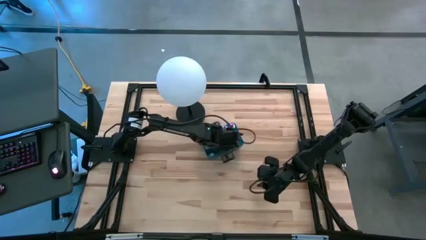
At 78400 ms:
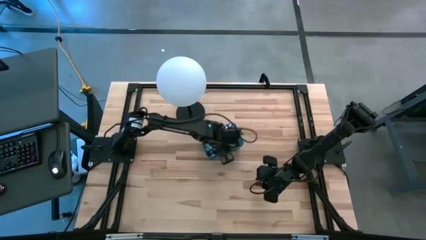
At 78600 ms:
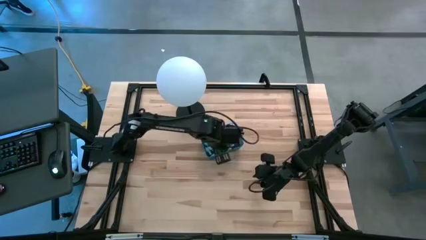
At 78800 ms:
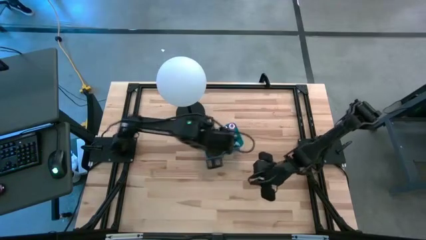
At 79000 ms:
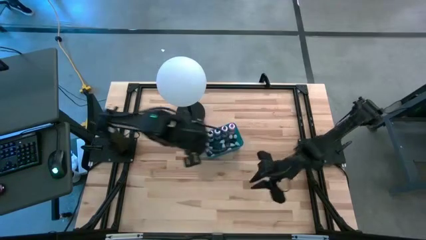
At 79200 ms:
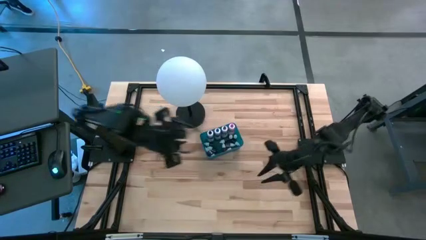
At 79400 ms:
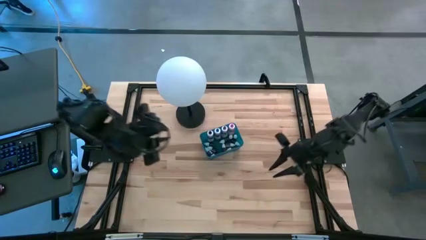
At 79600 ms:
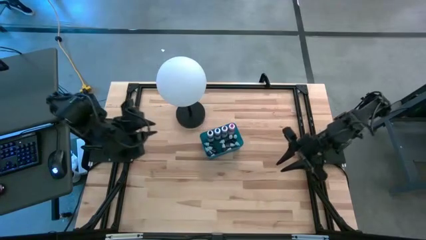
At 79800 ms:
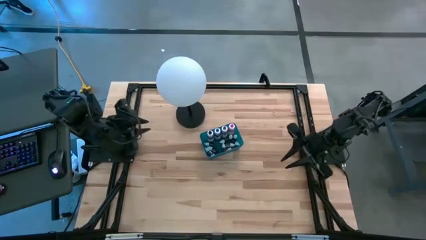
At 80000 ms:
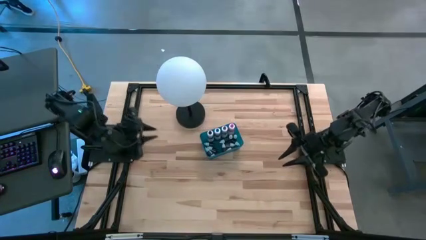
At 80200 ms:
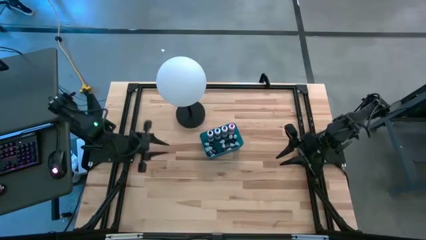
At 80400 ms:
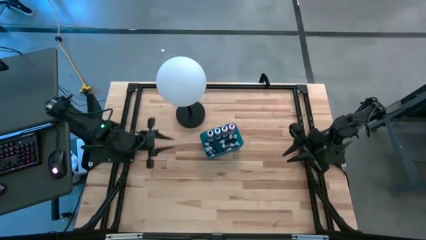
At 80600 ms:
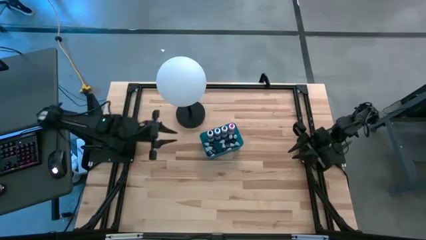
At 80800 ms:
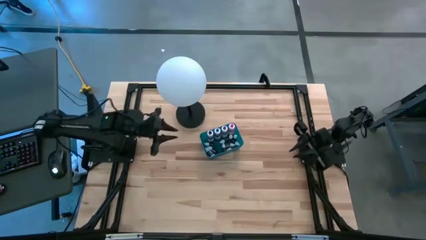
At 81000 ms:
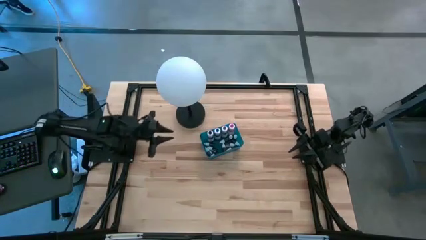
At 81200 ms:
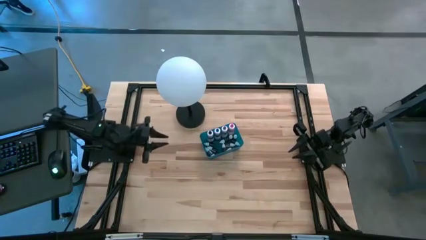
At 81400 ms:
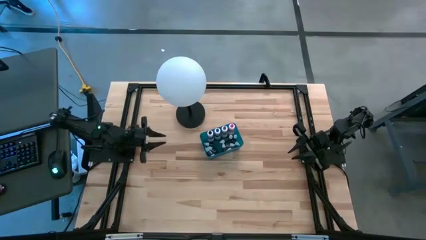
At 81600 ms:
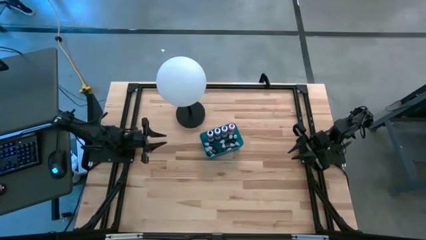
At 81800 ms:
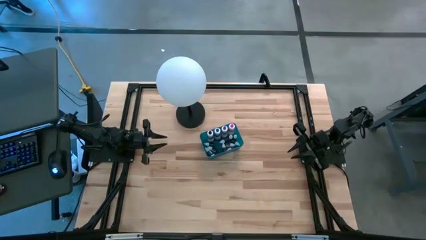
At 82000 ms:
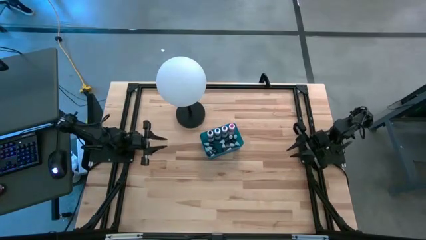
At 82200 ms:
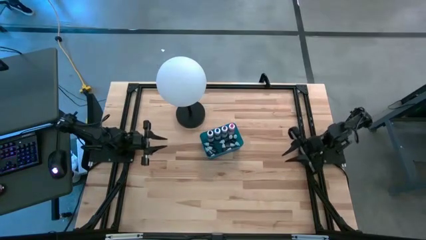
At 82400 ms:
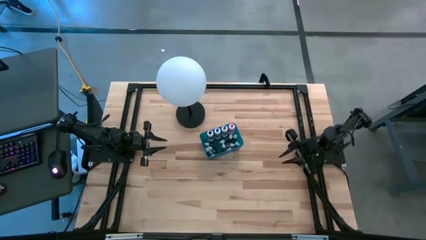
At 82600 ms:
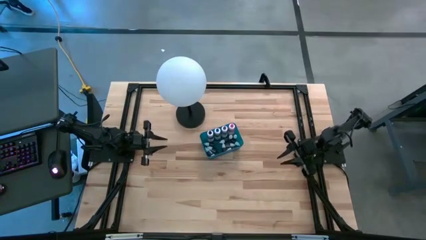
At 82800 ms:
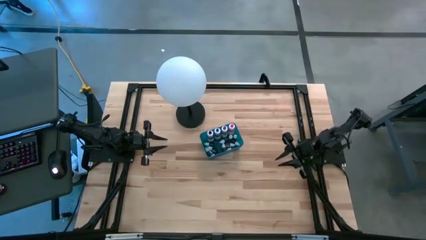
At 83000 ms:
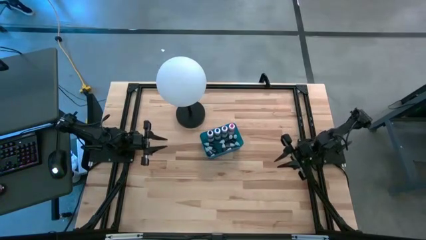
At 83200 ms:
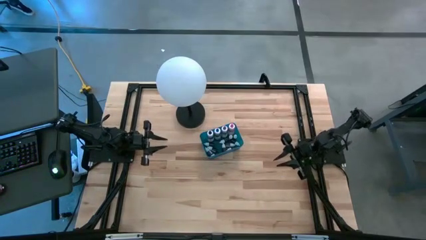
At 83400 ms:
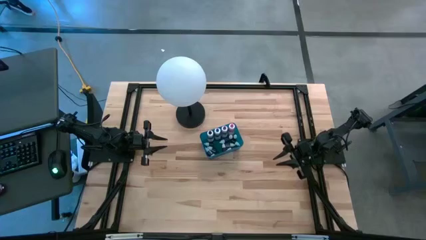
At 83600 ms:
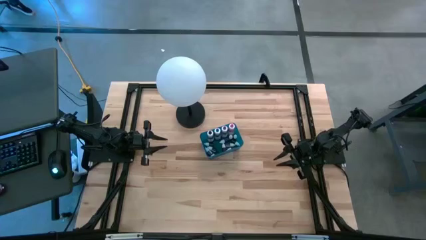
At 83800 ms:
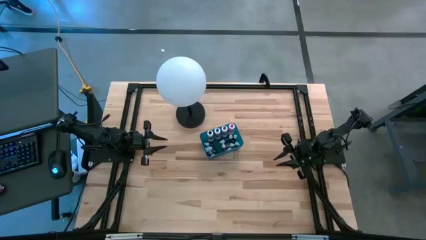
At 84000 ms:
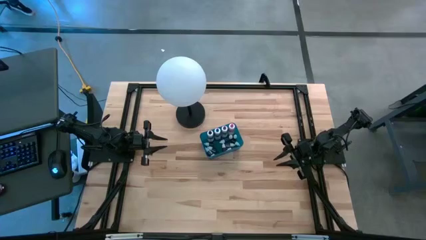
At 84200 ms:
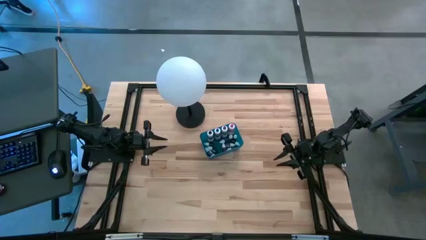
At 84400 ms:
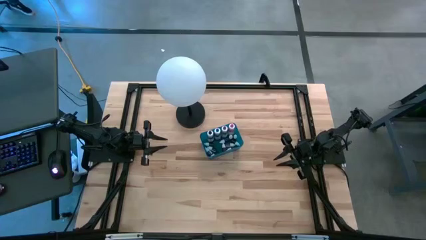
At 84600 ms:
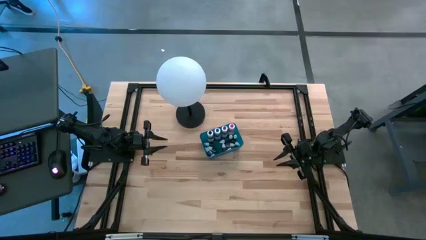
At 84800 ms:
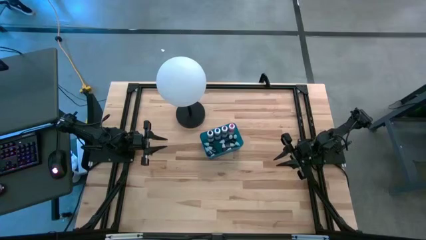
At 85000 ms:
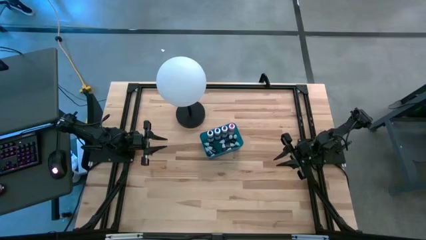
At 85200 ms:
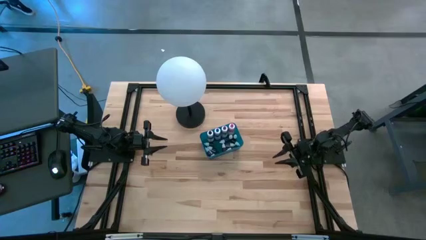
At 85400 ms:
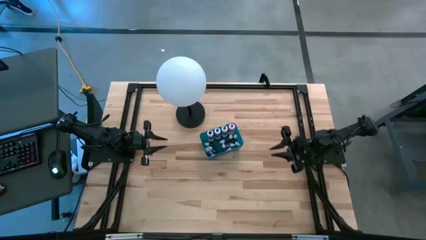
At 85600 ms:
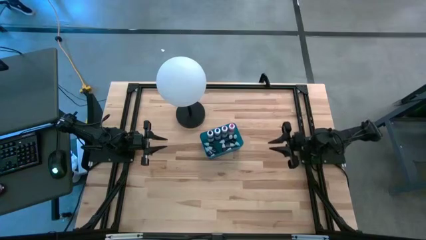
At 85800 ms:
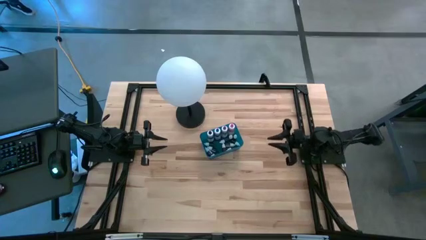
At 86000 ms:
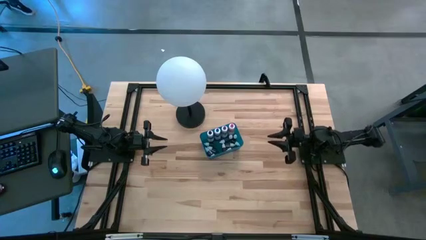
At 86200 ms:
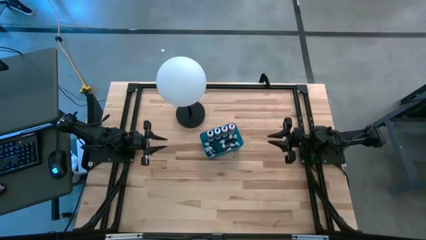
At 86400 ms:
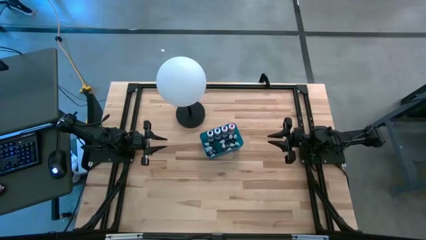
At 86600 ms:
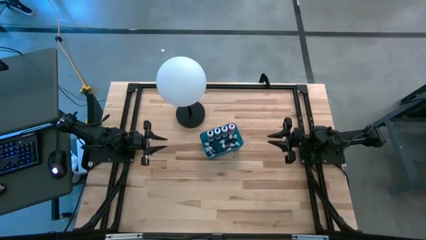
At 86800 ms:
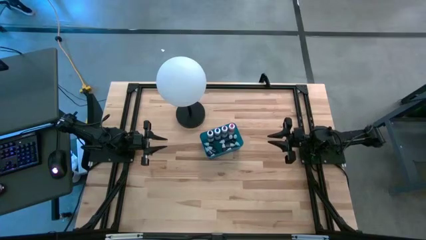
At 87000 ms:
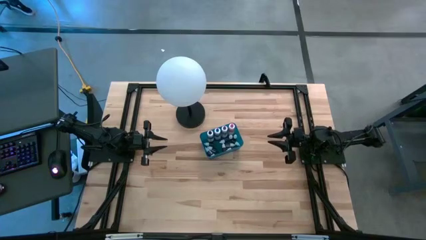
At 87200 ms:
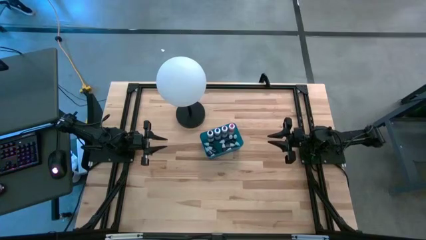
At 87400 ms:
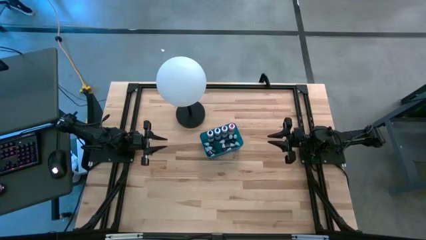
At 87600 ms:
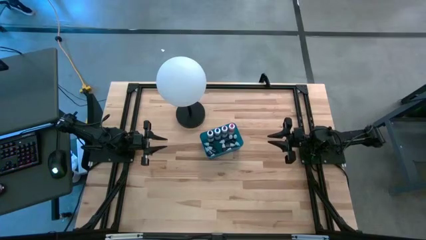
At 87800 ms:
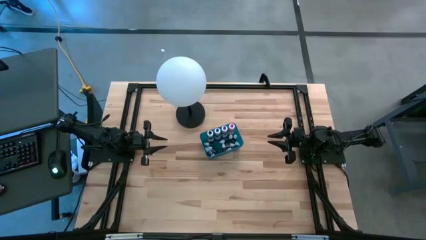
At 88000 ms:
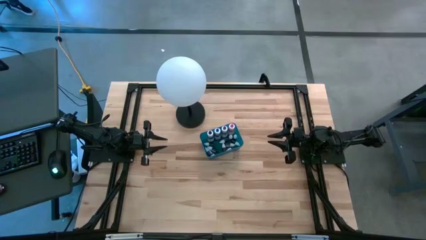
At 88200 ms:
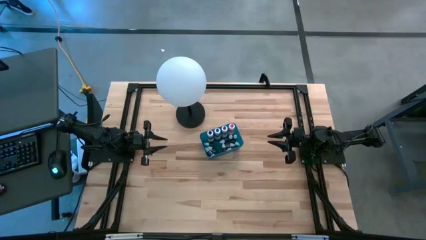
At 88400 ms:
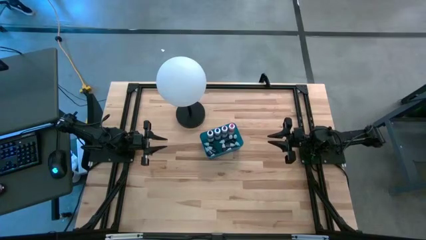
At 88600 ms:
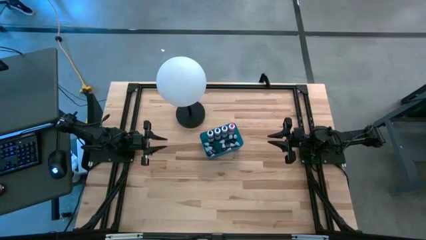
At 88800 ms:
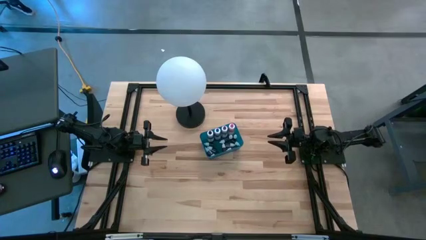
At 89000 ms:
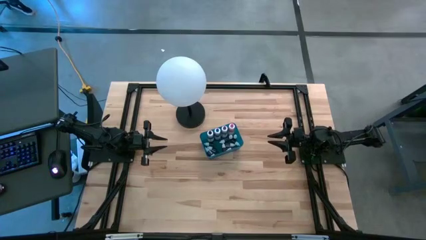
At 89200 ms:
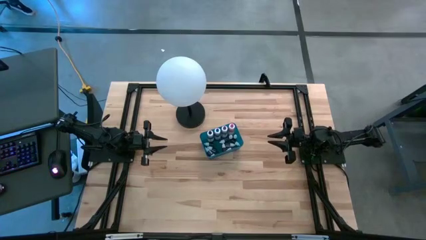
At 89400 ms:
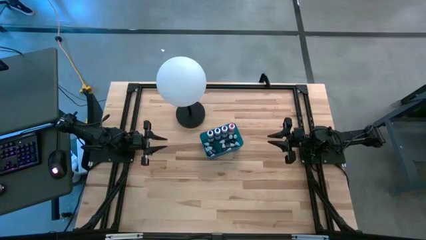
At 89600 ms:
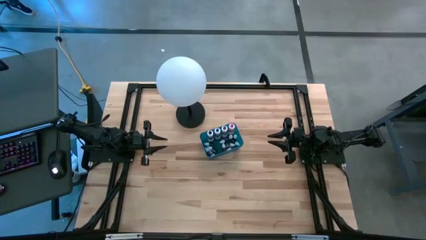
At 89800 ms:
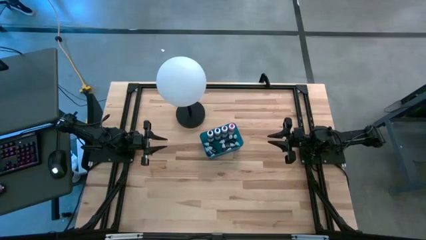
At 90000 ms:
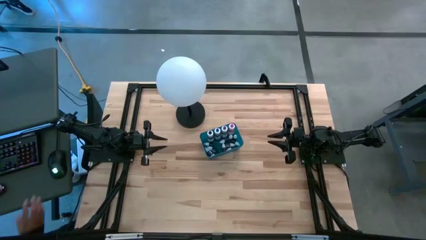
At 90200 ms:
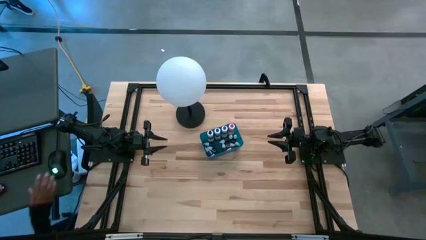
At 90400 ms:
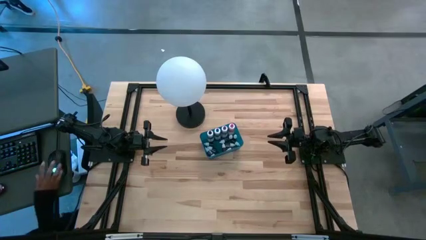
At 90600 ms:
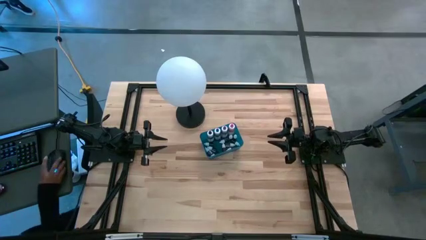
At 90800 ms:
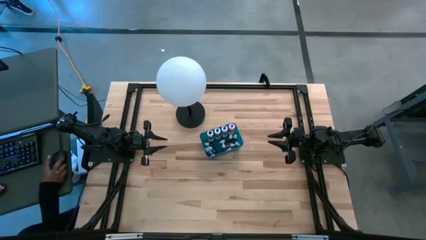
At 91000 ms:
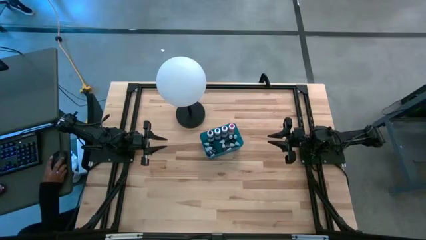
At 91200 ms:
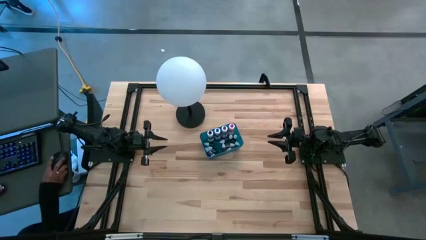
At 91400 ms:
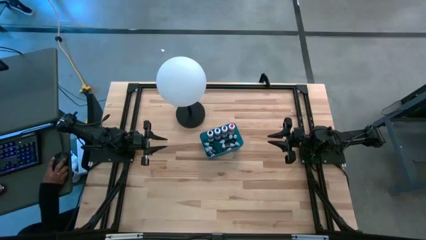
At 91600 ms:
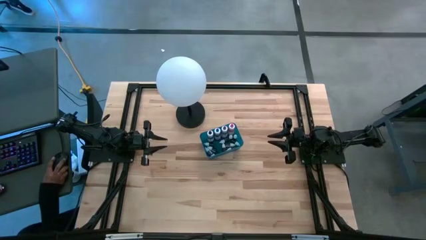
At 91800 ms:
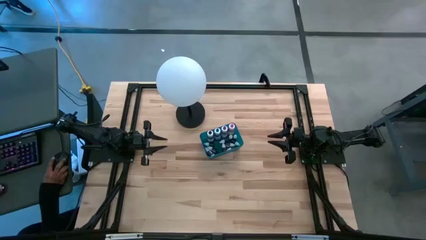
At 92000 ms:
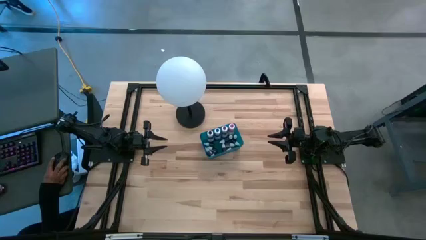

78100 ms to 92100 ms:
Task: Pick & Place food coloring
Return to Home Position

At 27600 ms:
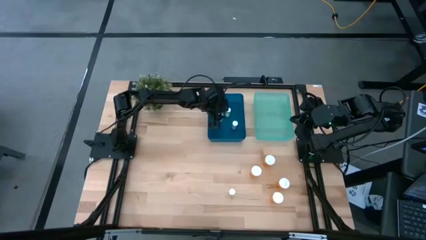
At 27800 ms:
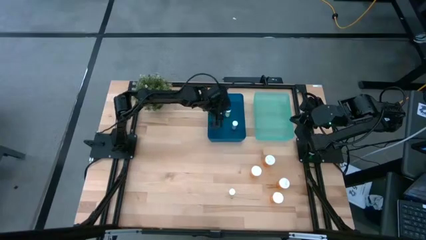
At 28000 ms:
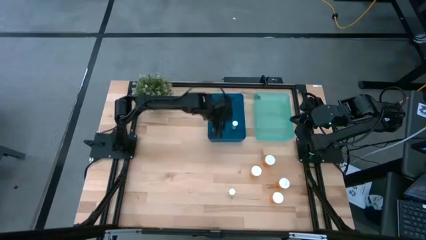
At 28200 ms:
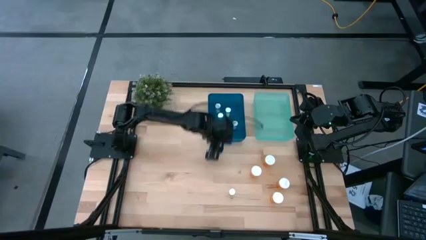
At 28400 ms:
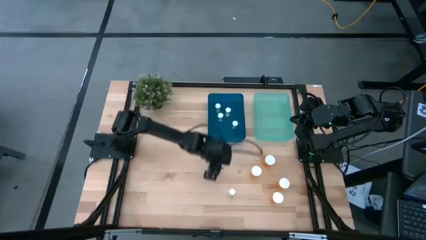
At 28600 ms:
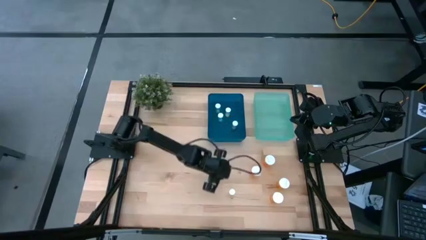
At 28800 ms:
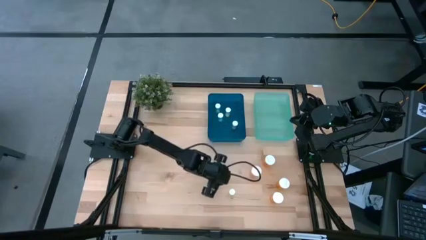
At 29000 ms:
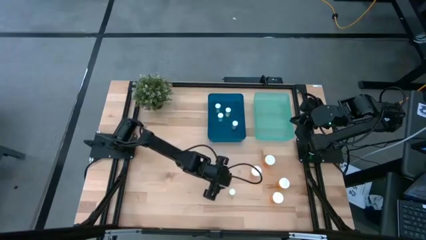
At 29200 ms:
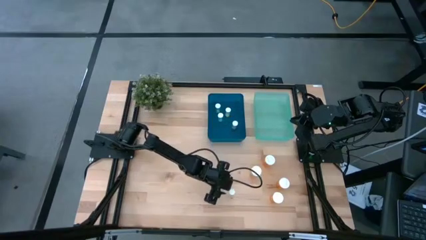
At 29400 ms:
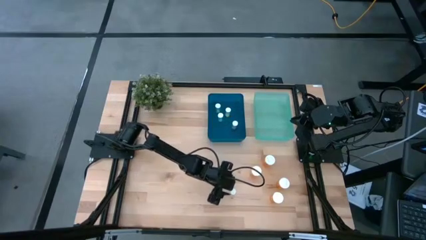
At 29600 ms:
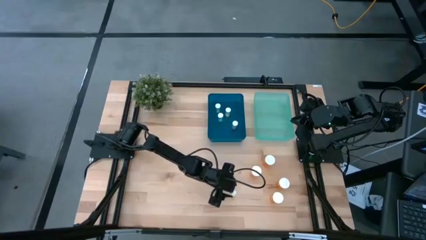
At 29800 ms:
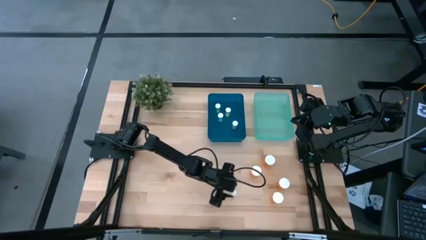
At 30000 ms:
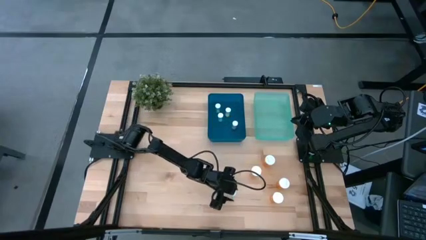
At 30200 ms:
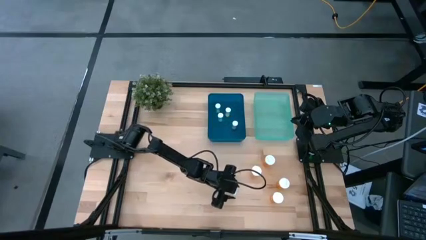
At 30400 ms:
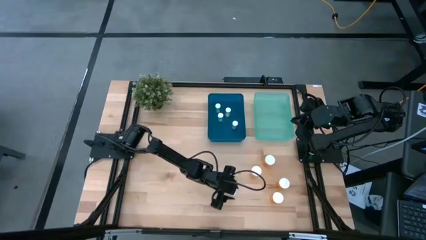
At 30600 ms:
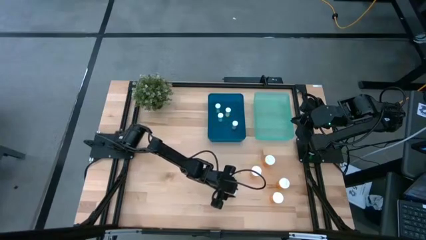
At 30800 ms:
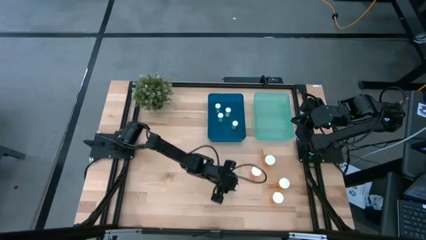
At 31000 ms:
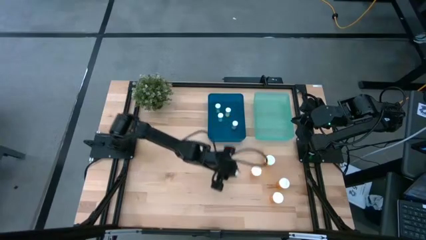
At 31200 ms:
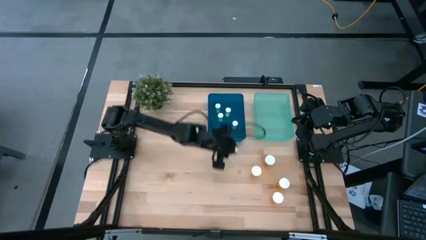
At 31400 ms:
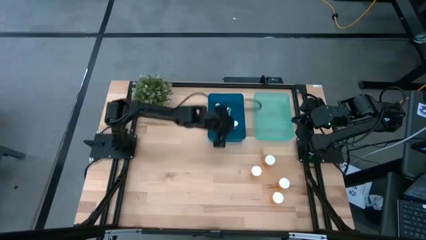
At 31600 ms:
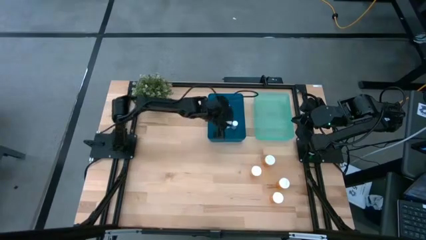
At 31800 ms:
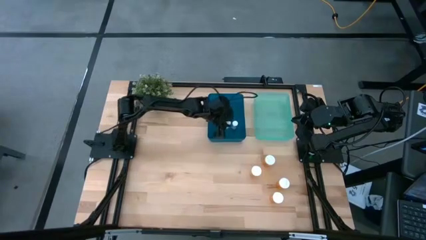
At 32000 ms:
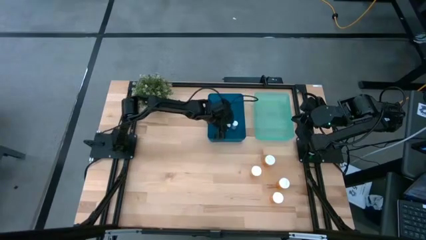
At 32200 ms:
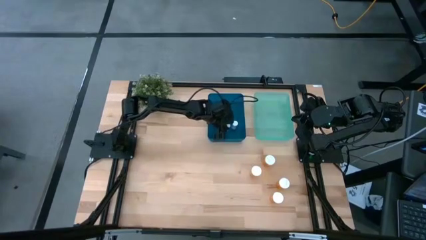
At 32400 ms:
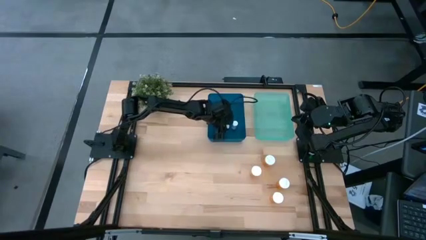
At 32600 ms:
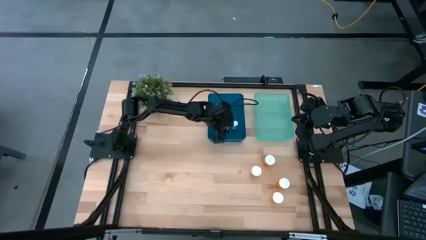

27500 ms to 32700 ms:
Task: Pick and place medicine bottles into bin by pill shape (circle, oval)
Put the small yellow pill bottle into the blue bin
